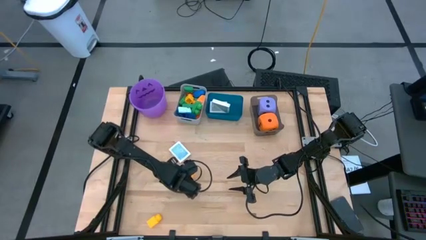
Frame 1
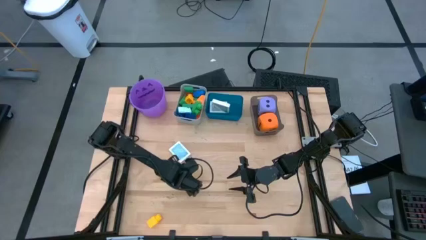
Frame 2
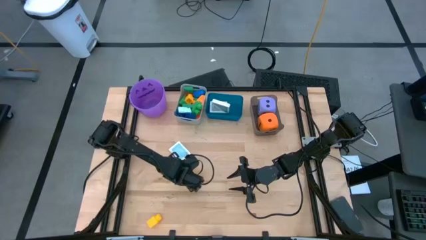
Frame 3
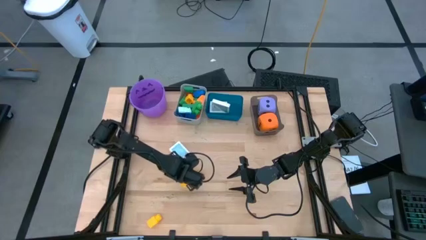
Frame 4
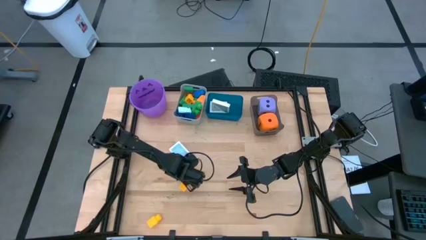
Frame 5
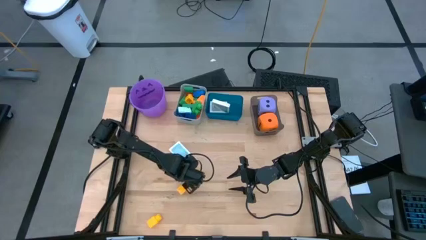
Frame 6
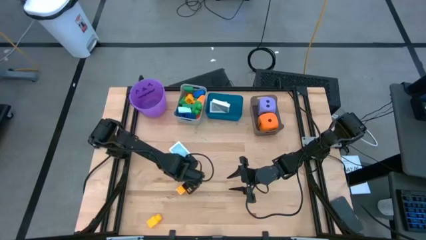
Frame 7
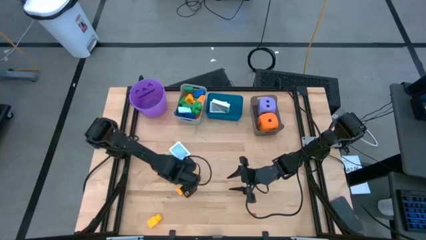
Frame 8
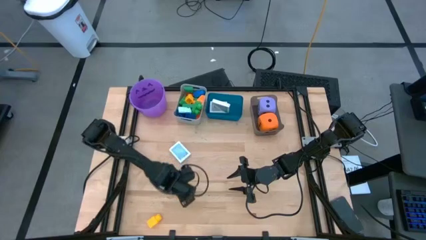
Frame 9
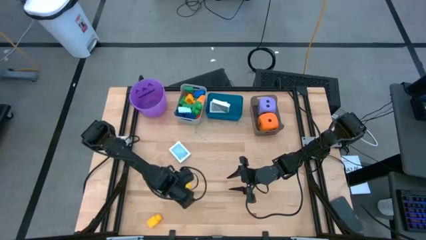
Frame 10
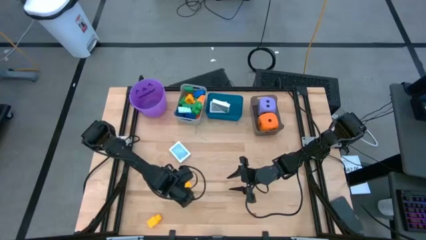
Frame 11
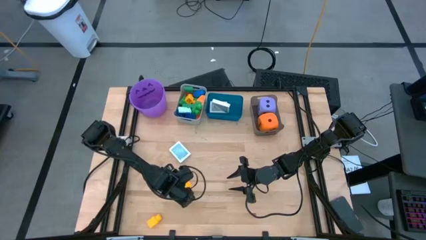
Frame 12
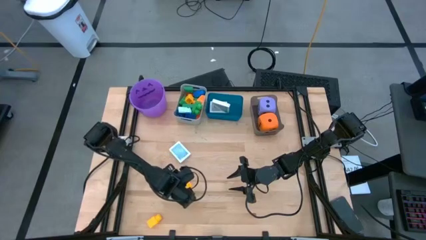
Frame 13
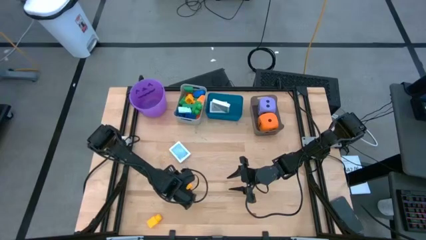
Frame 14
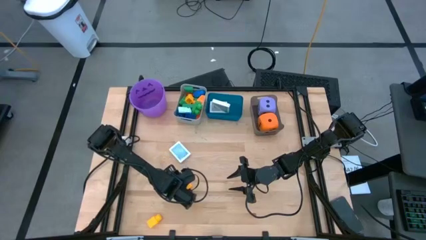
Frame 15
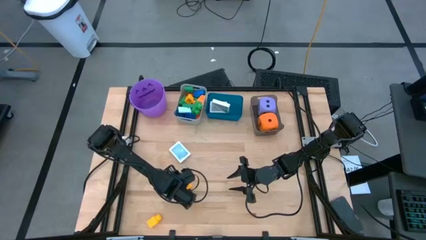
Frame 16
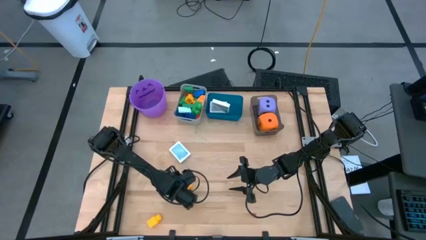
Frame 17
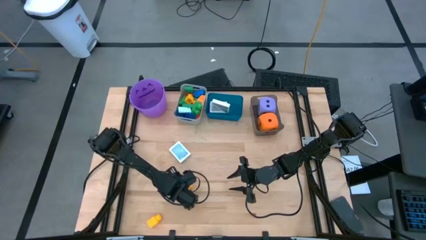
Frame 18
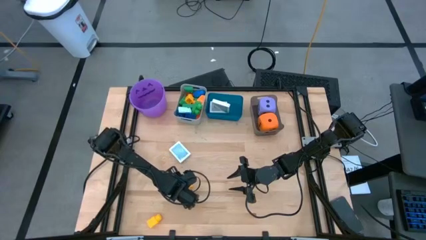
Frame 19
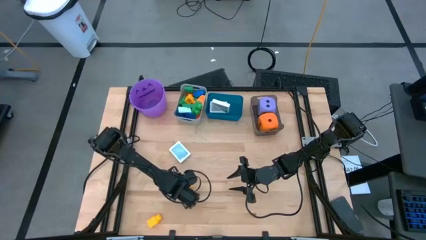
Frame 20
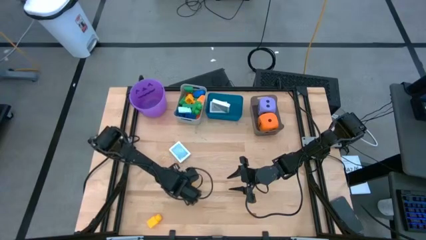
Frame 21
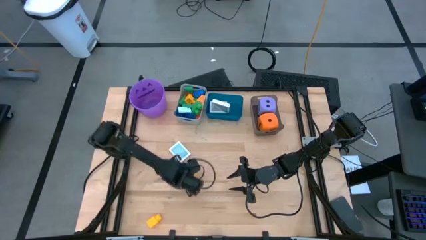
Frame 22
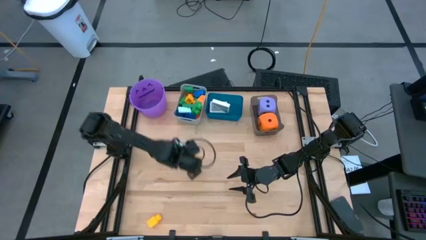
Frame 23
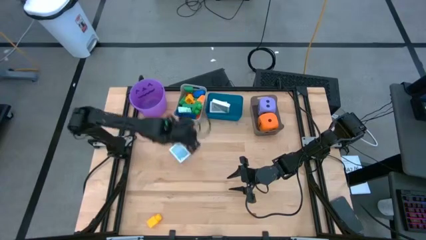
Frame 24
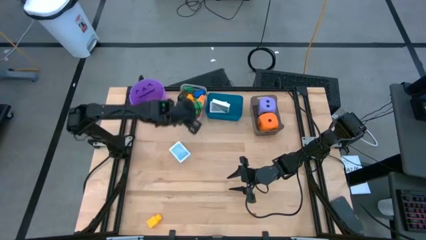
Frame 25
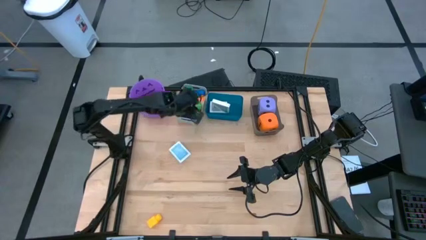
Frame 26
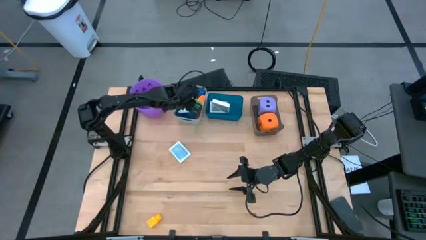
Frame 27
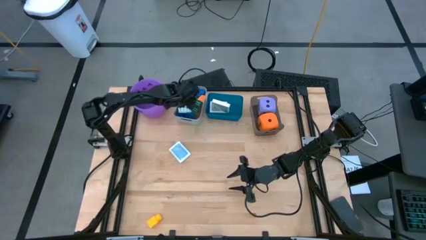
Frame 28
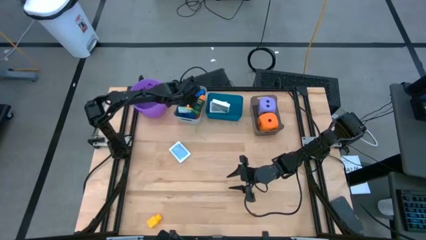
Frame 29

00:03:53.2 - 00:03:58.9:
Task: Pick & Place Toys
Put the yellow game piece into the gray bin

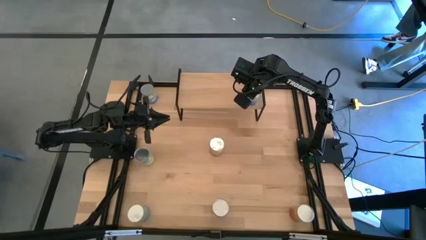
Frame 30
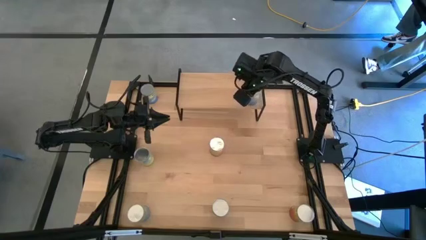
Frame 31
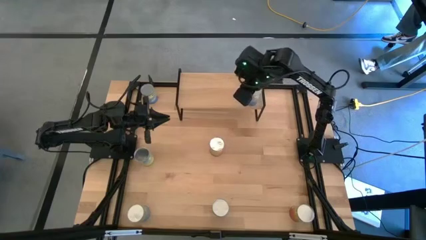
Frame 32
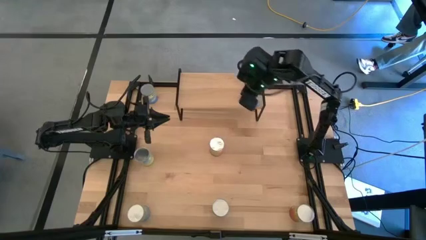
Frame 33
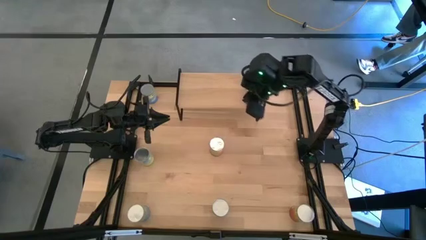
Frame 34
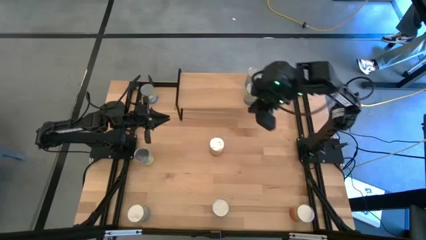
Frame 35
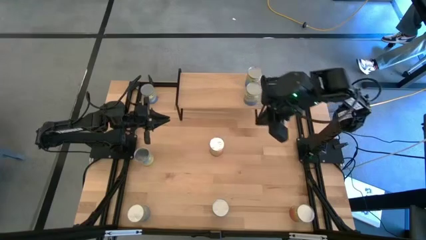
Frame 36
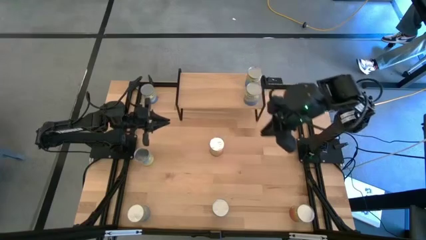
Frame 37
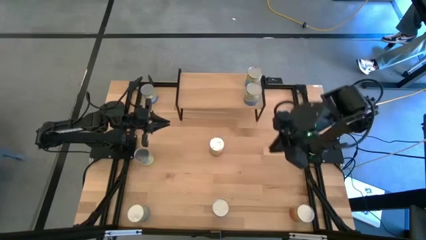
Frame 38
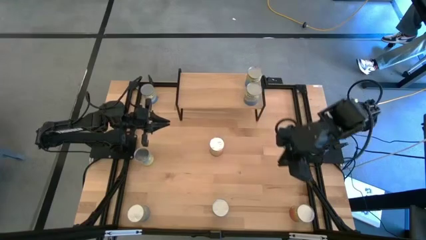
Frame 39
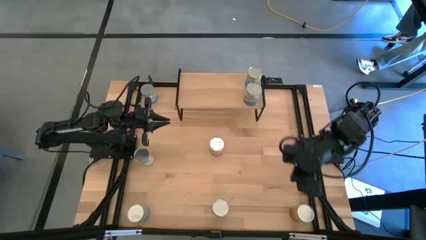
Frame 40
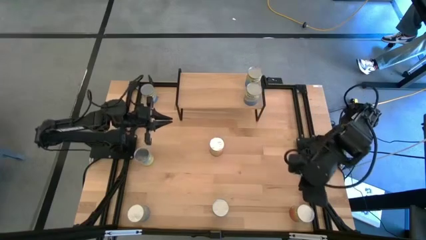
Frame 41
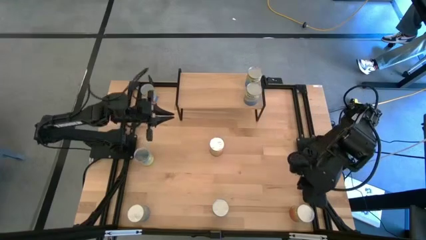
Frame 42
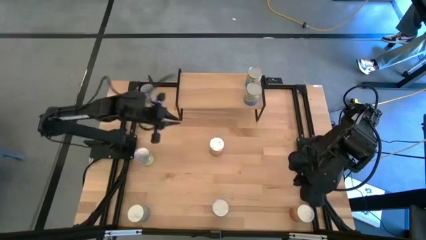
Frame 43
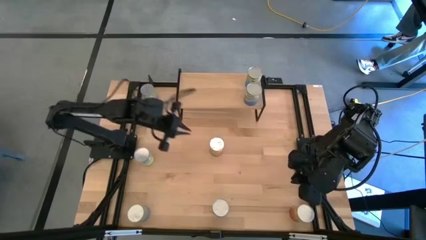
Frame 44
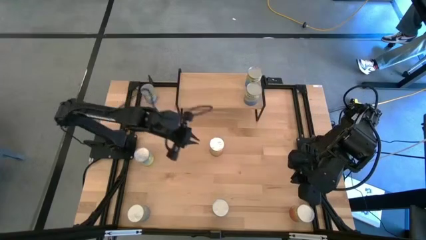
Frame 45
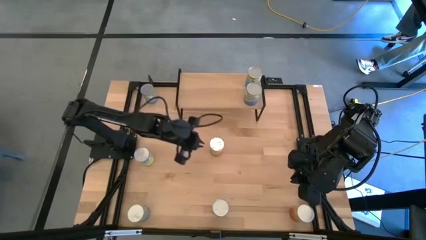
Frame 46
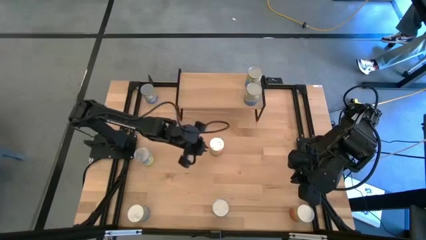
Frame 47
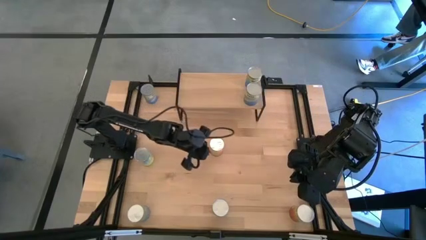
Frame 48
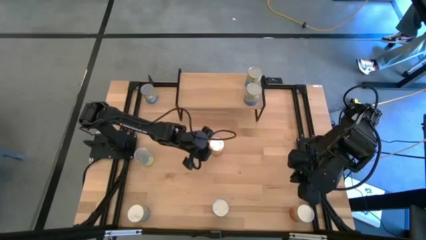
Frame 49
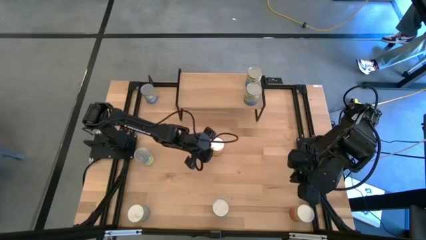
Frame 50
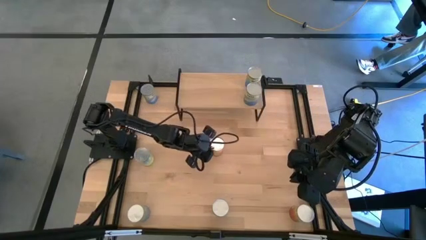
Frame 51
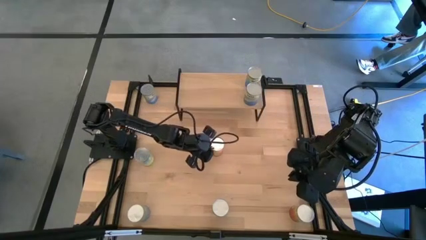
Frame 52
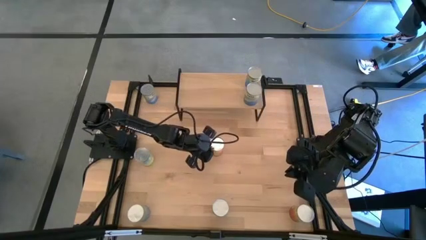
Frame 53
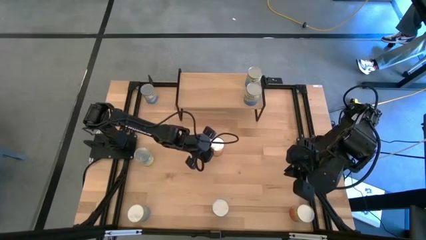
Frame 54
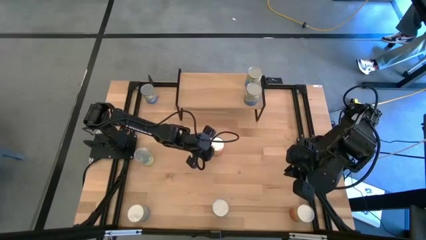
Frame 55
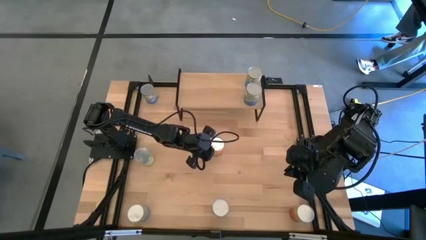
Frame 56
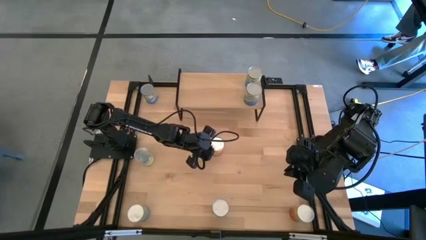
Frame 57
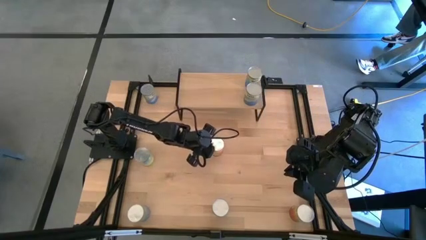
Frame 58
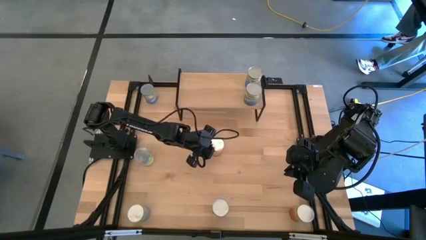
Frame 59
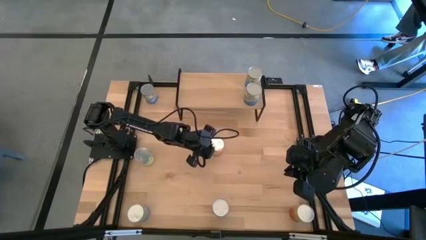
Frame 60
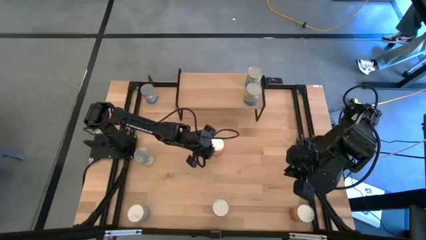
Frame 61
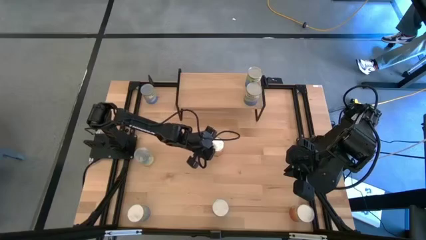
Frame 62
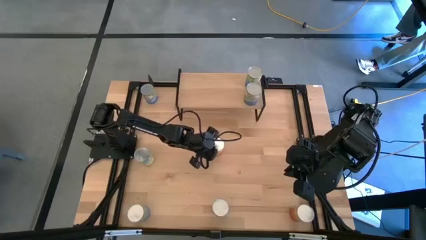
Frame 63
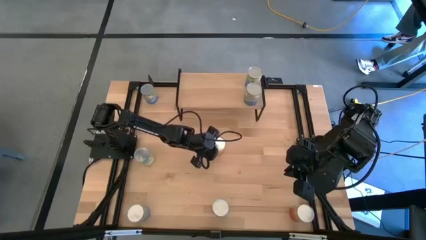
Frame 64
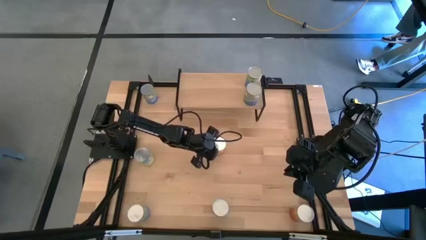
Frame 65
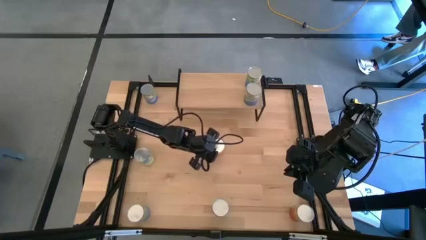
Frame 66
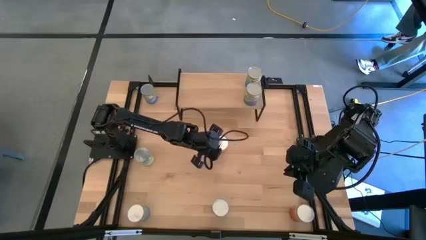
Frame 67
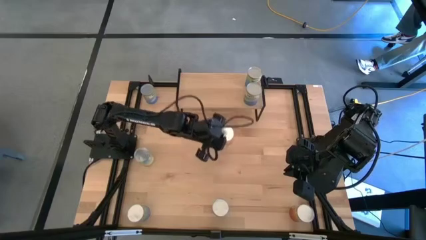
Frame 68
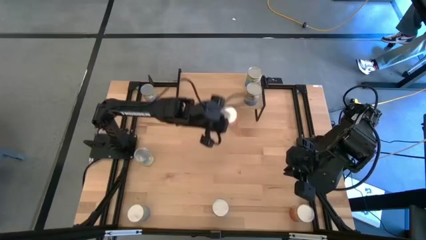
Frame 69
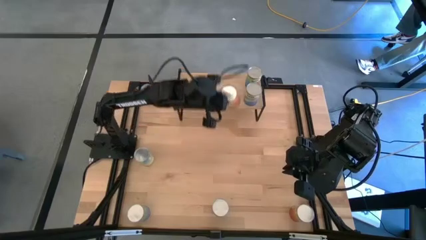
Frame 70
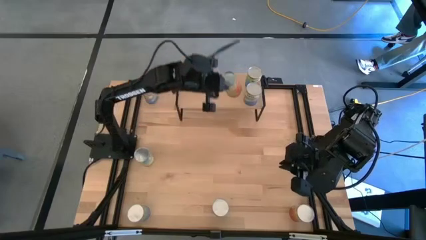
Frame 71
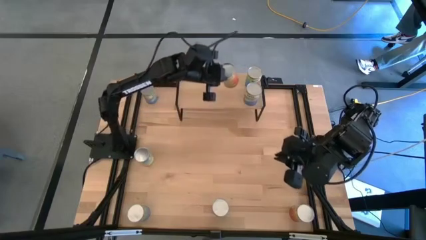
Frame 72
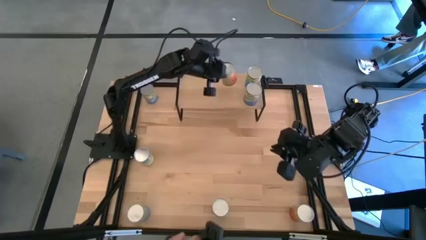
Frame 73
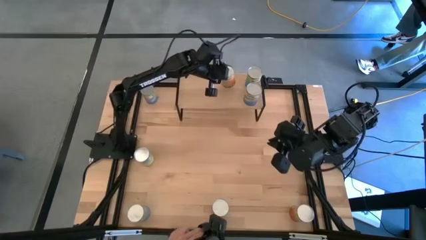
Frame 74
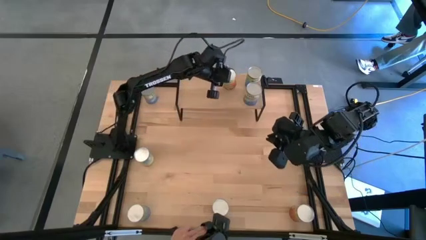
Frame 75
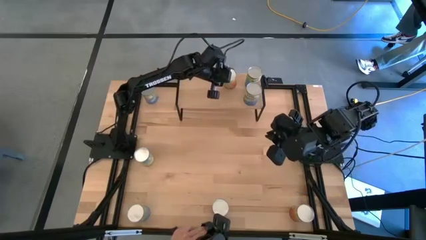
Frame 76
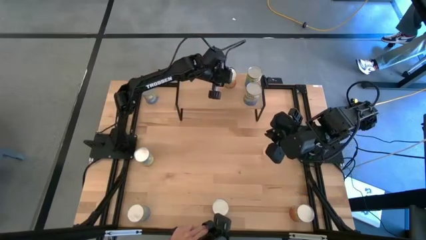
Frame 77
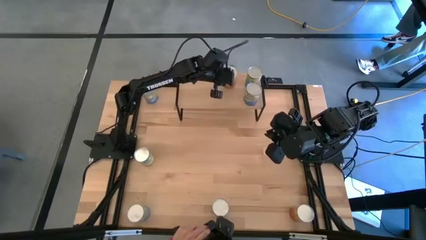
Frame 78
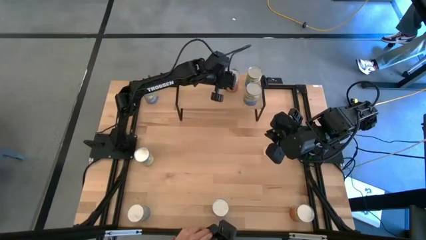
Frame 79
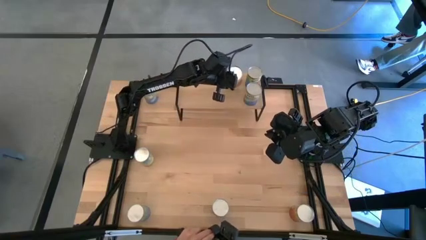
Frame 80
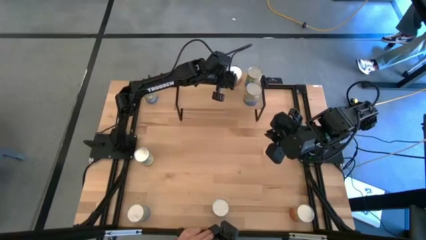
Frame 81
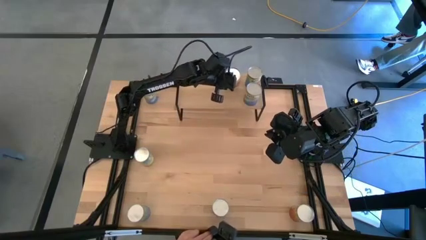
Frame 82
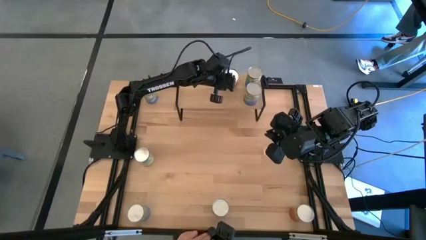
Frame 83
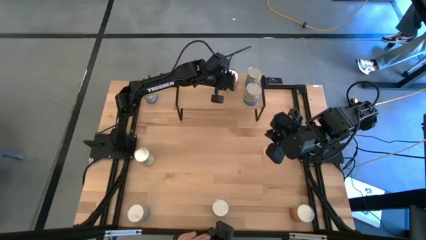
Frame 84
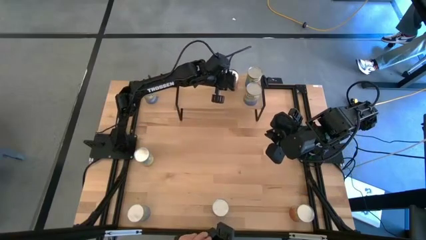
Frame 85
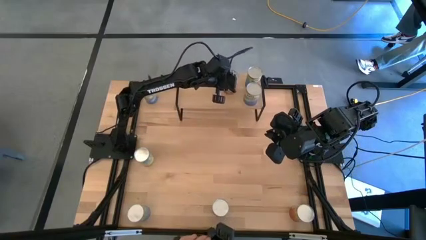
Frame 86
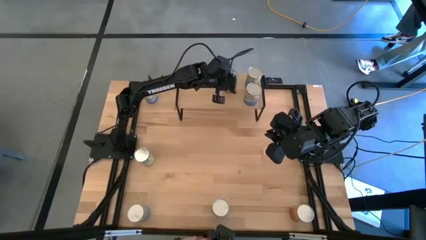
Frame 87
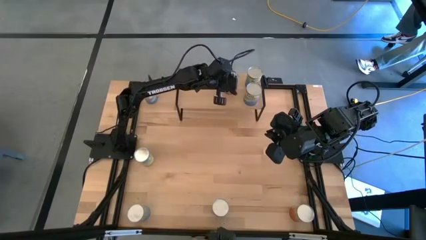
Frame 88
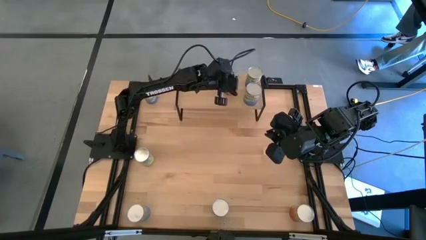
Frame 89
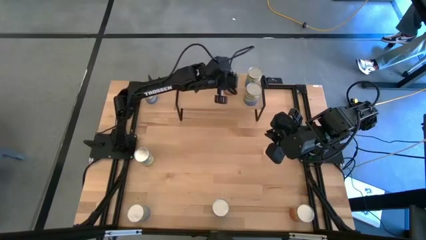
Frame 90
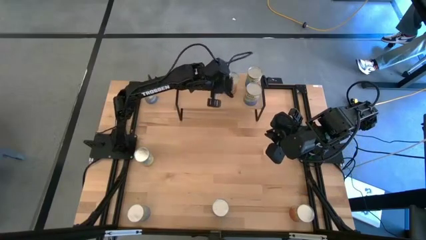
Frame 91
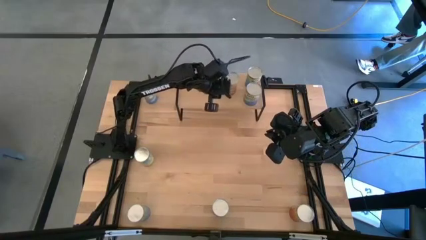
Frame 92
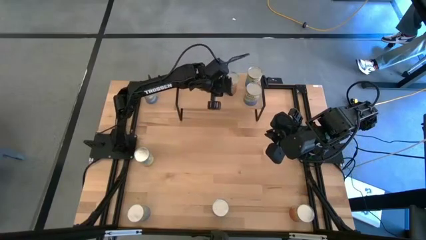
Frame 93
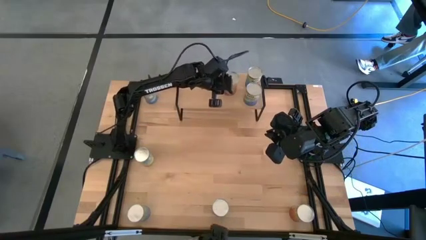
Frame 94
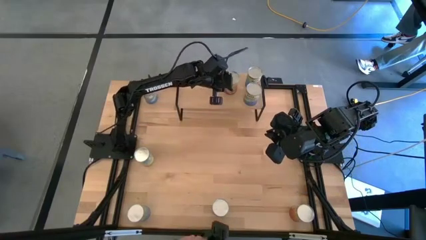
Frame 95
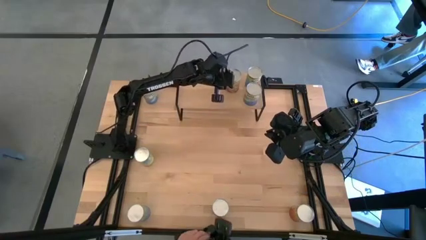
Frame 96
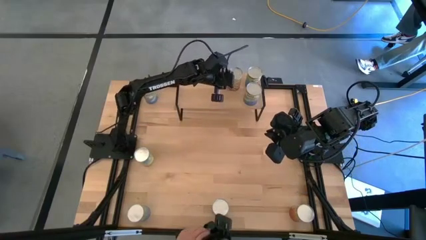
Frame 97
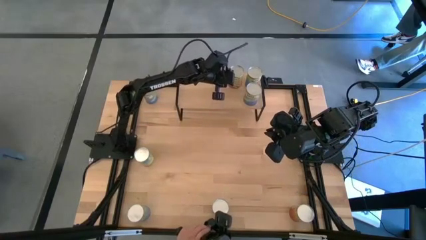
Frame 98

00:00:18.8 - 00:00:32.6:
Task: Pick and place cans onto a shelf
Put the canned green beans on the shelf
